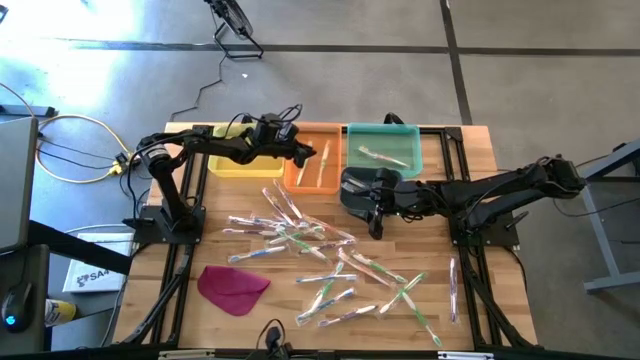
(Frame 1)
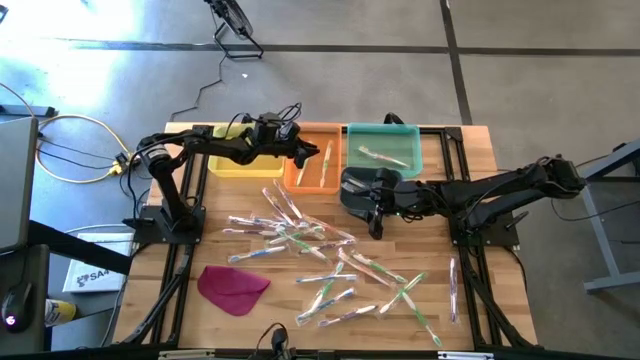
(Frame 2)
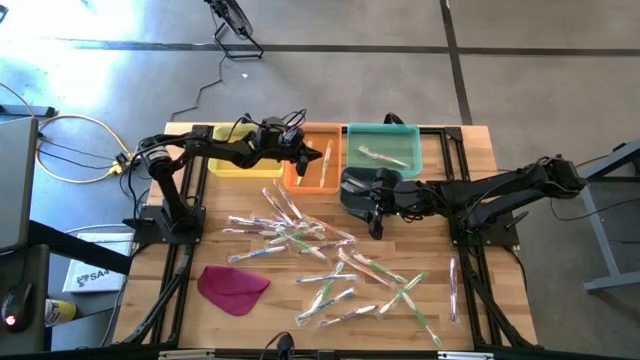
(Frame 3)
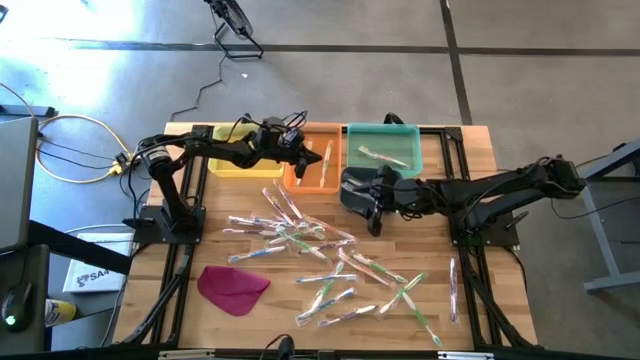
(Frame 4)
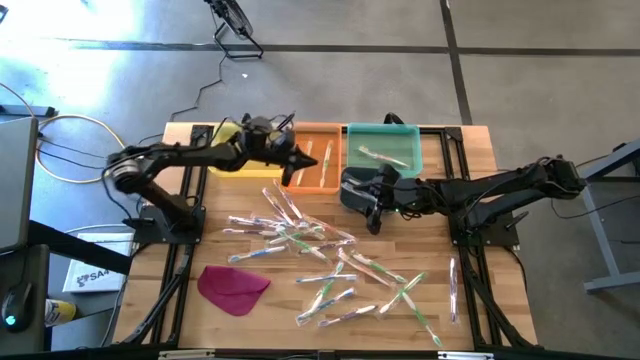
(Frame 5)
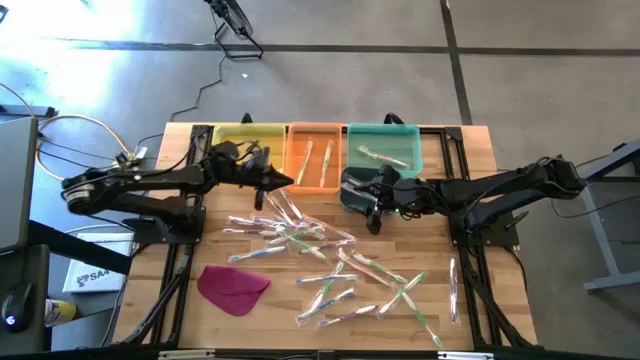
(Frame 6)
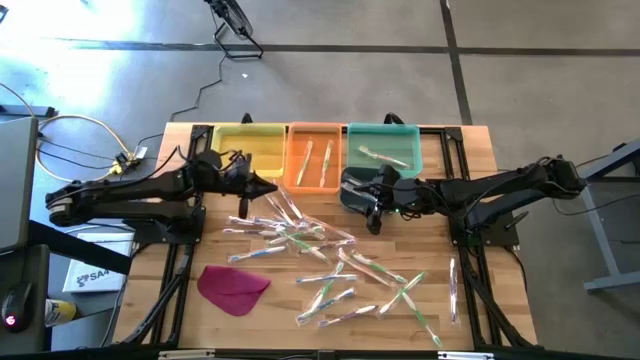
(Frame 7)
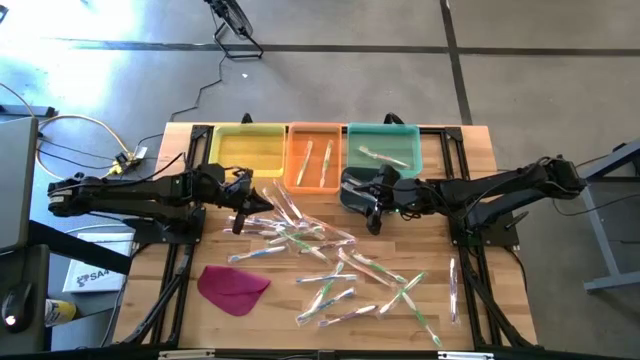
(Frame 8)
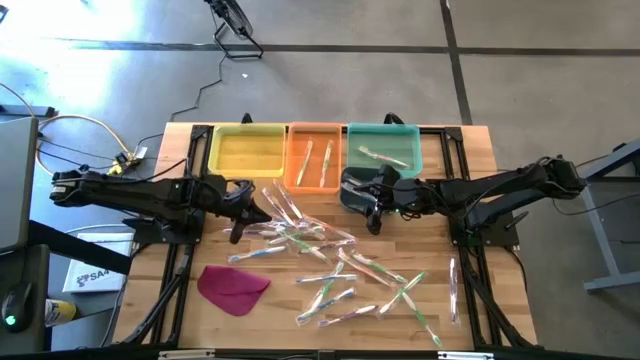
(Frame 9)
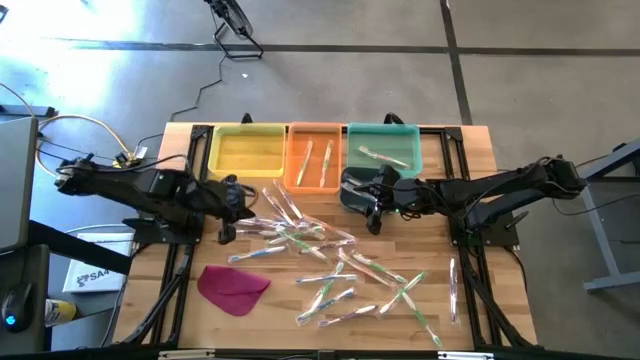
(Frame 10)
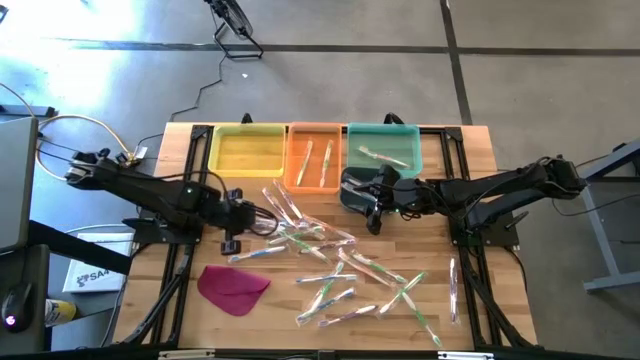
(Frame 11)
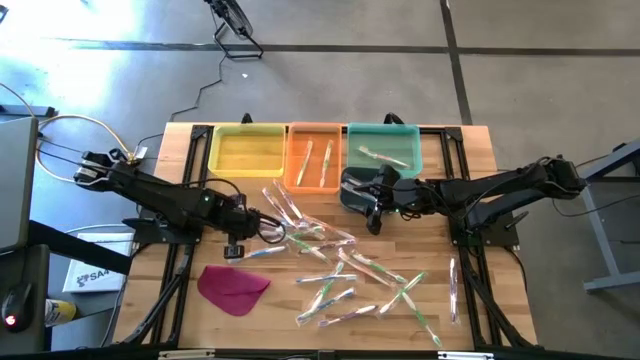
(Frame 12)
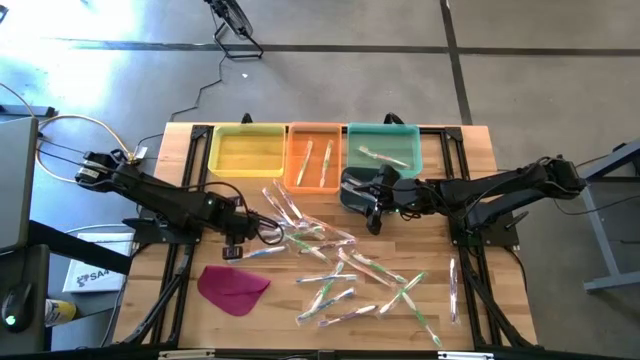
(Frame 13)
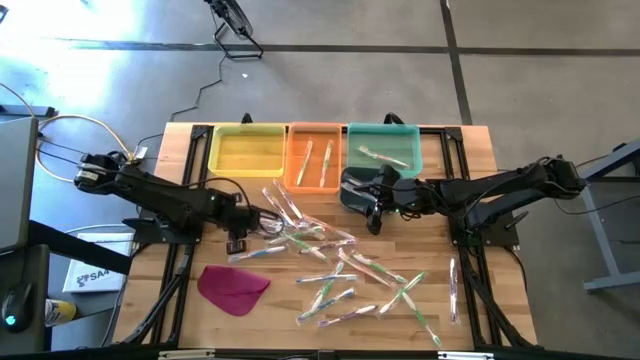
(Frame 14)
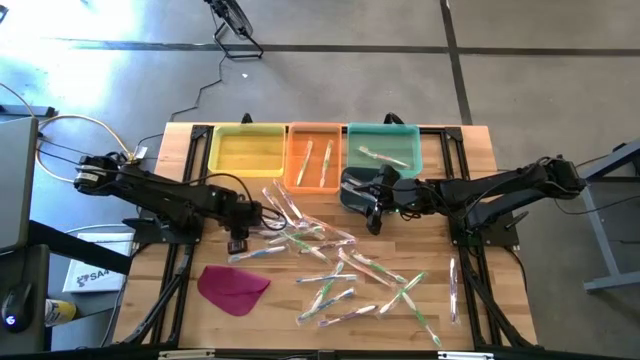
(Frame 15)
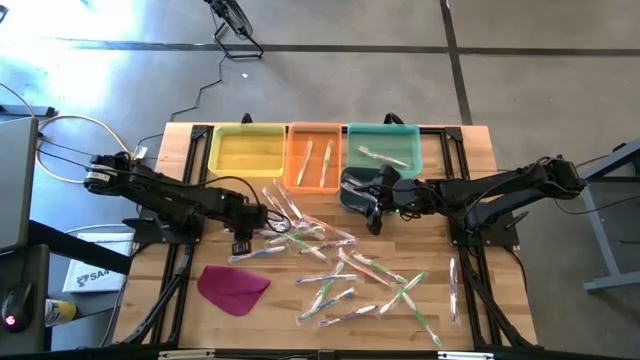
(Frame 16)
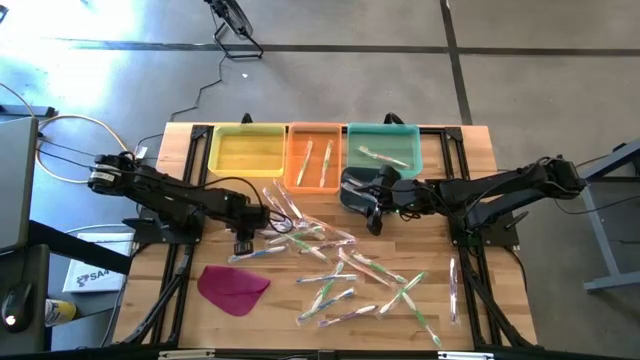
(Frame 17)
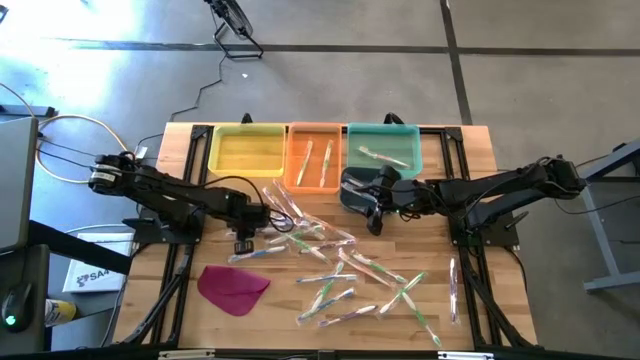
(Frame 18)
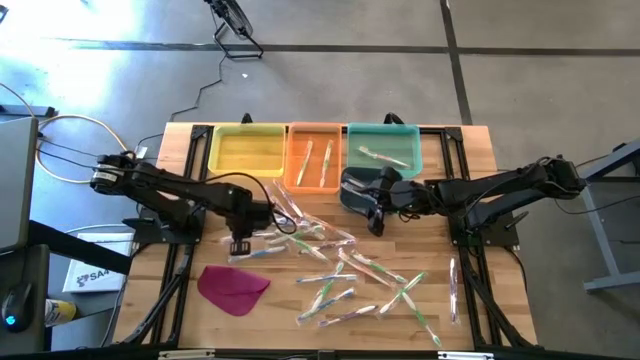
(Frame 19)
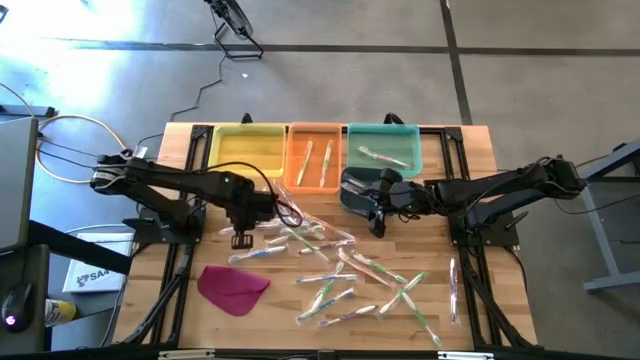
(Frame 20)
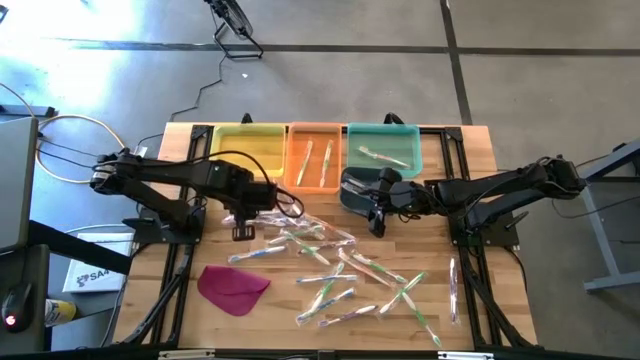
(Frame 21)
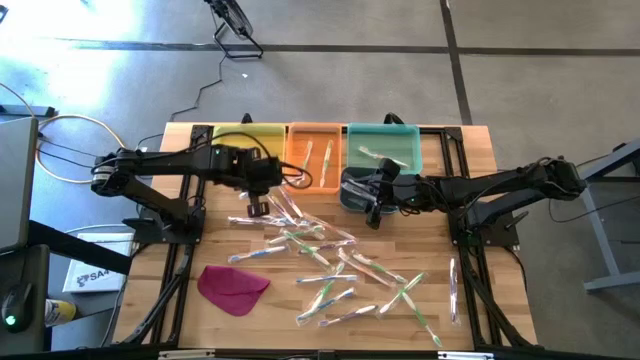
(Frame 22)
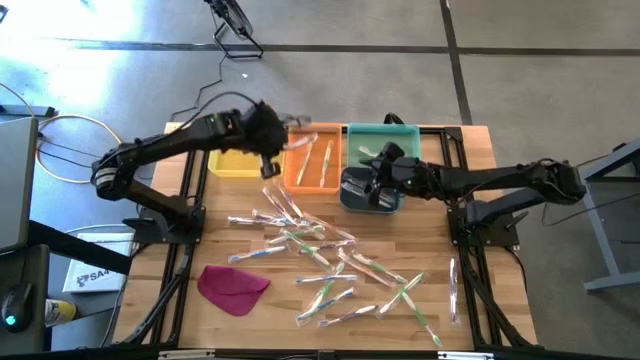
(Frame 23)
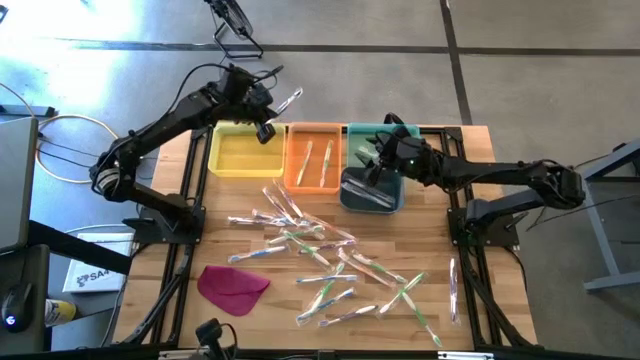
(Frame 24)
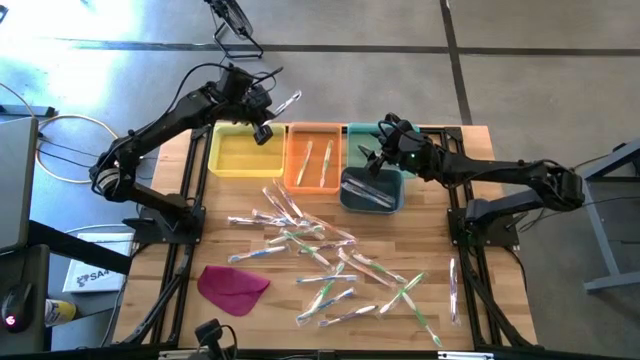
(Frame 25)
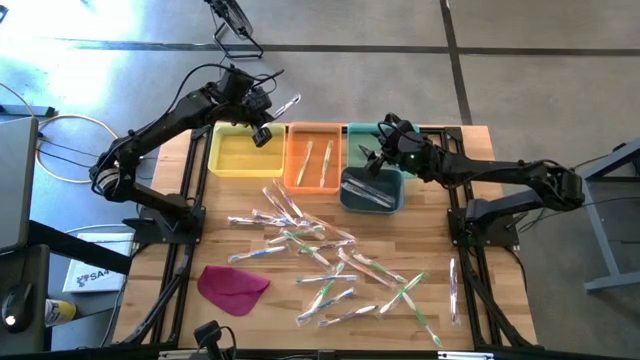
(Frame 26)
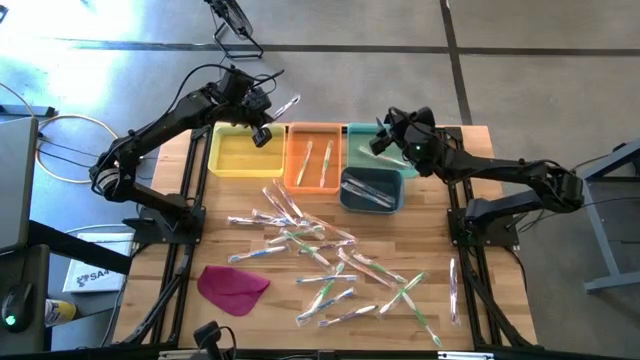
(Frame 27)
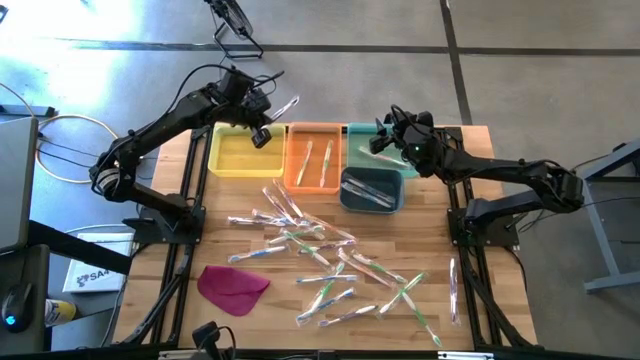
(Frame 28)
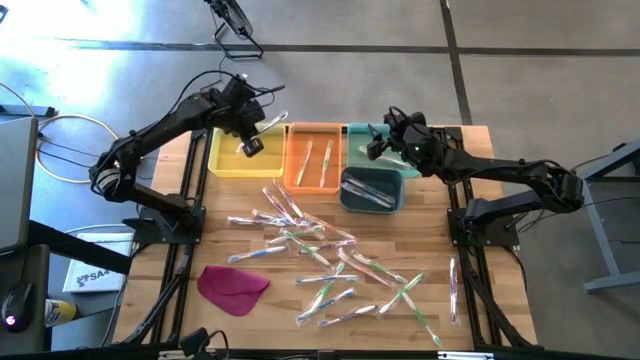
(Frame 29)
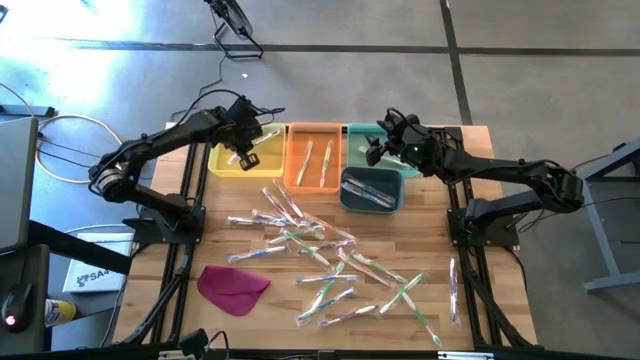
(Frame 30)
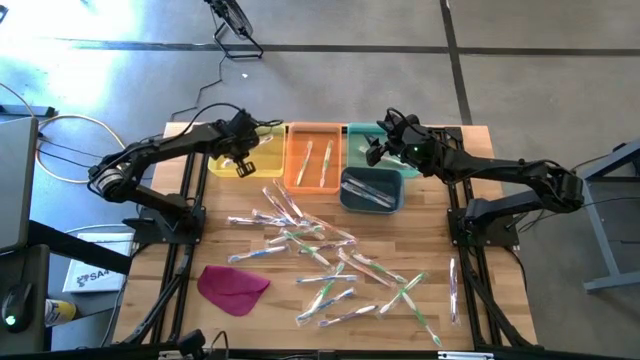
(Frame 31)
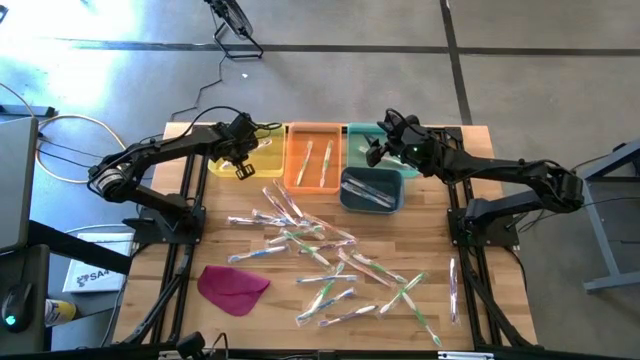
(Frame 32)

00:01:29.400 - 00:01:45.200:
Task: Pick & Place Toothbrushes
Put the violet toothbrush into the yellow bin

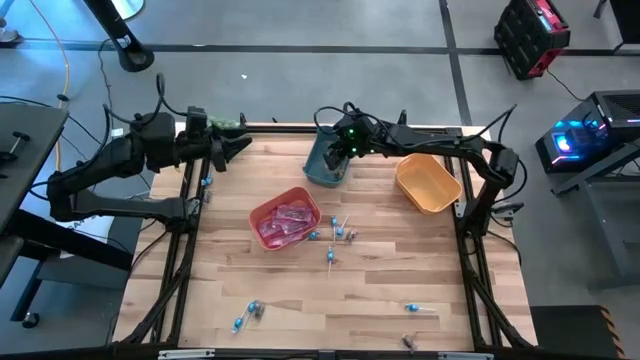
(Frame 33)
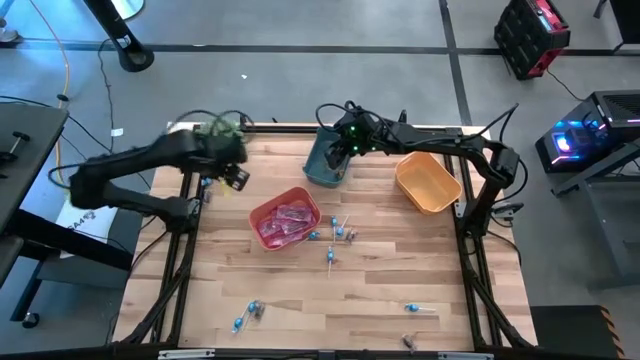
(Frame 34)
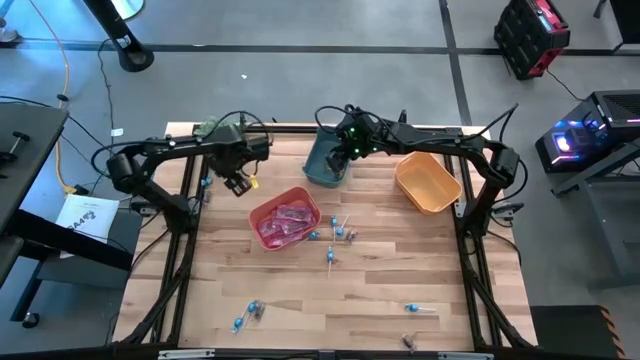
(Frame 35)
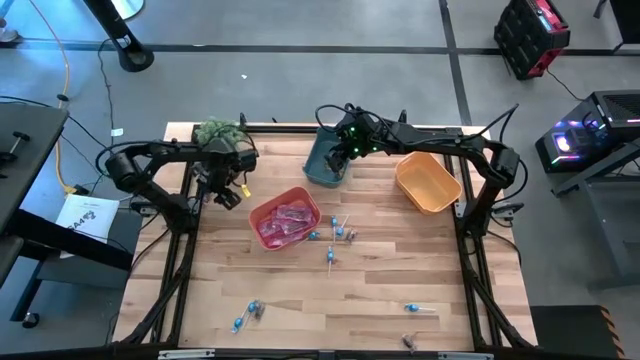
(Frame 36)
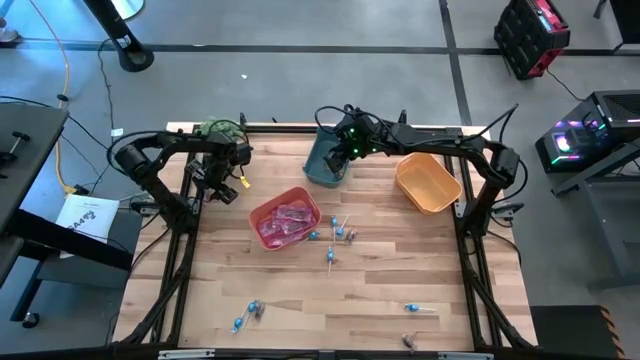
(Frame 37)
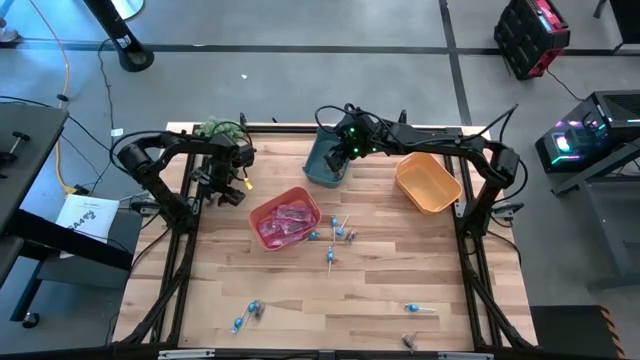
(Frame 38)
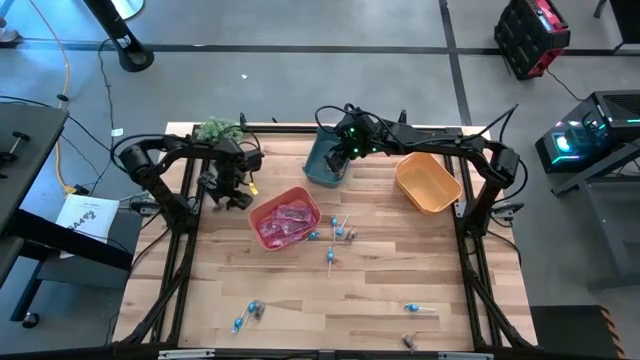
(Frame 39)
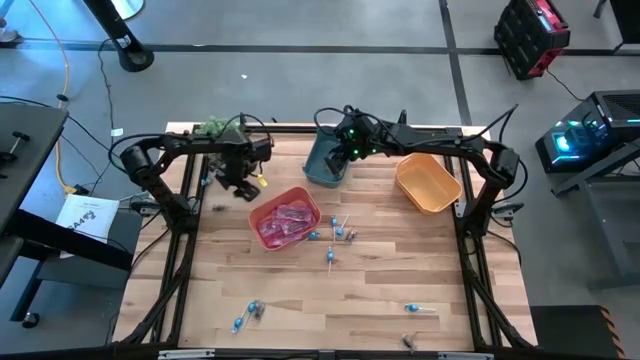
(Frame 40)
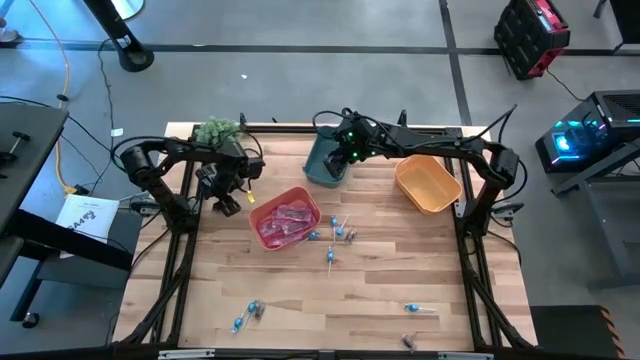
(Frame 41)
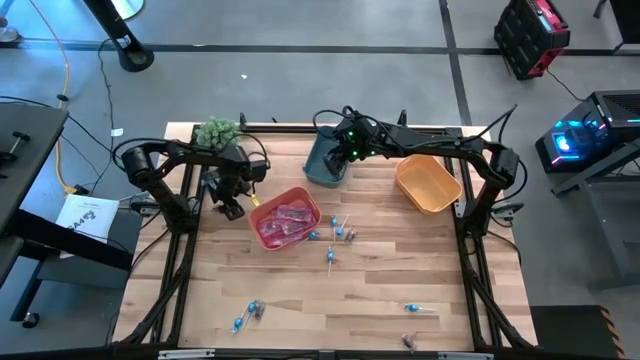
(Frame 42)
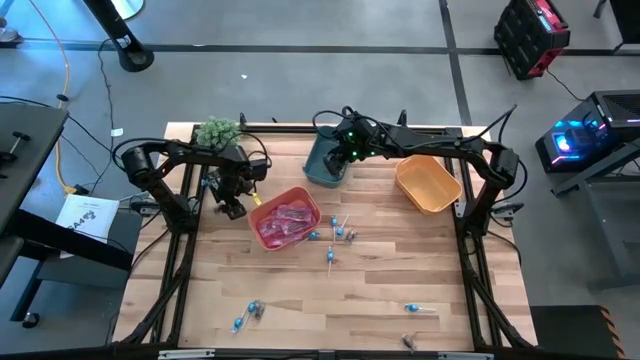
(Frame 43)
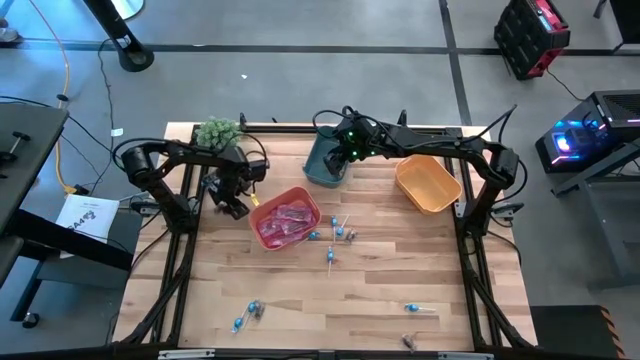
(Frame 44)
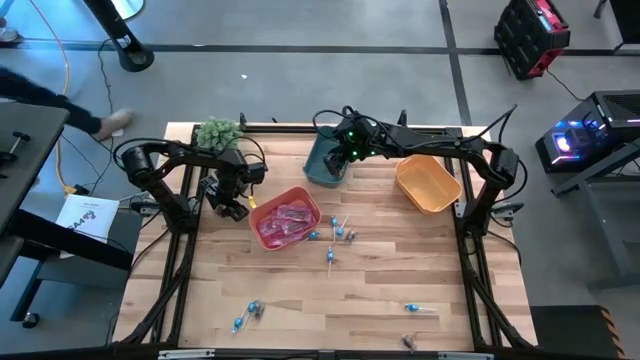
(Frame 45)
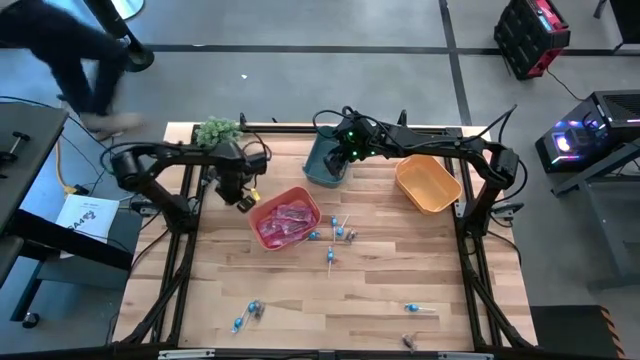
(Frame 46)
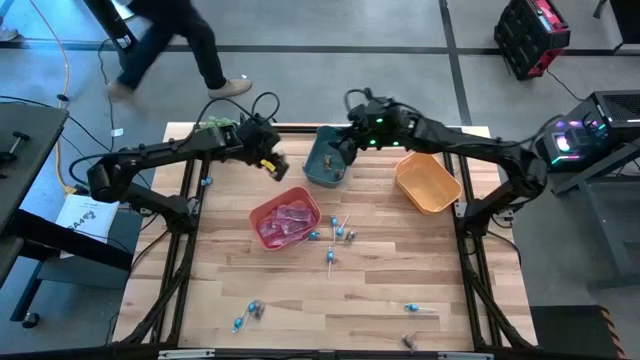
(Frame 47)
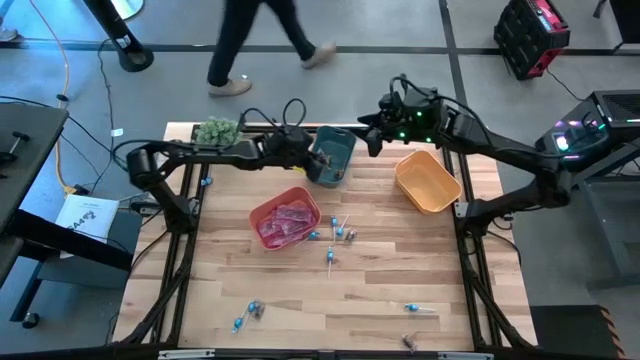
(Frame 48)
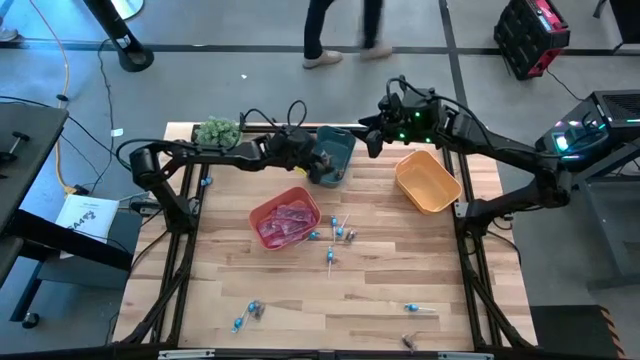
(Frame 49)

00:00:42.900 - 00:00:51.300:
Task: Sort candy
Put the black candy into the blue bin
